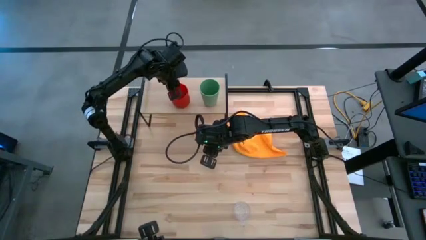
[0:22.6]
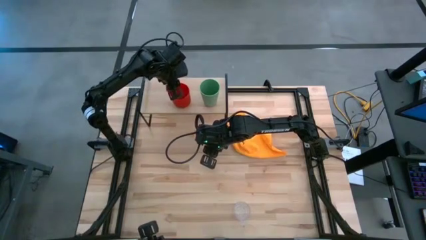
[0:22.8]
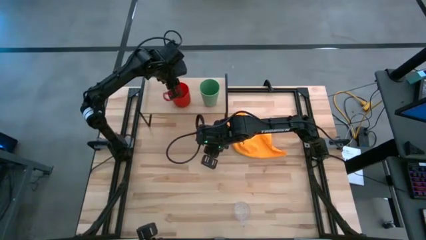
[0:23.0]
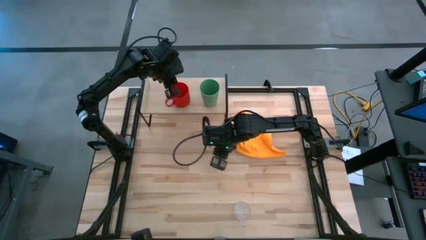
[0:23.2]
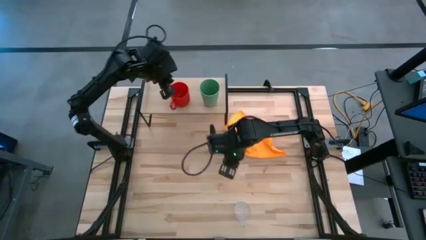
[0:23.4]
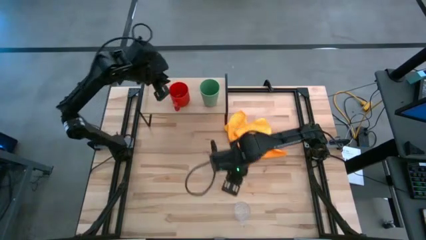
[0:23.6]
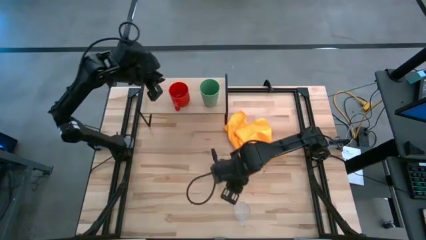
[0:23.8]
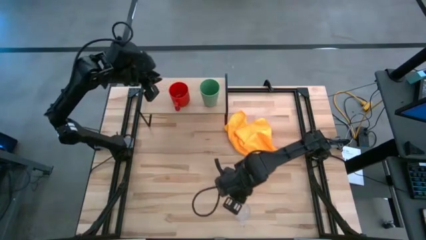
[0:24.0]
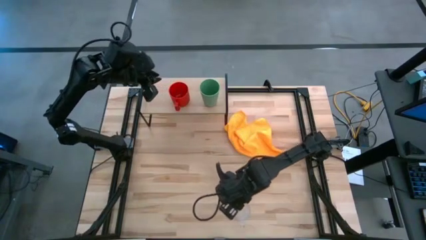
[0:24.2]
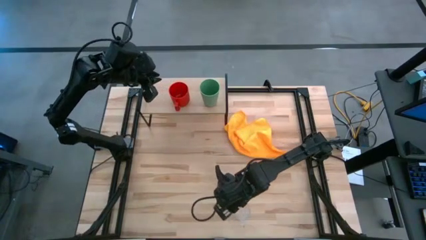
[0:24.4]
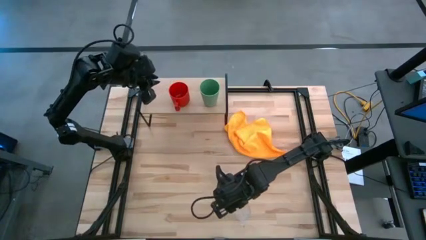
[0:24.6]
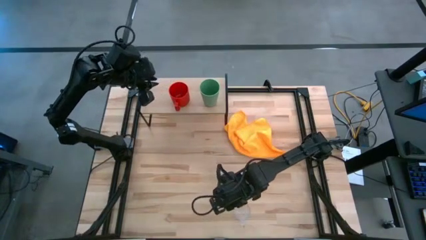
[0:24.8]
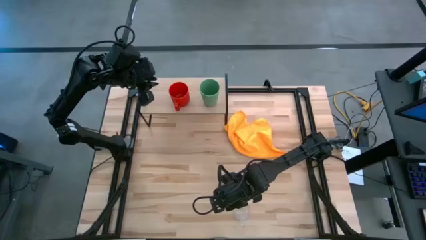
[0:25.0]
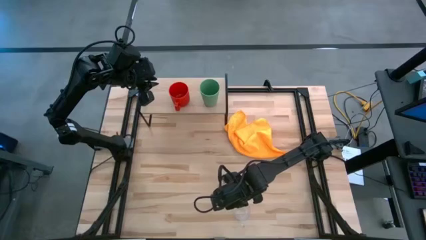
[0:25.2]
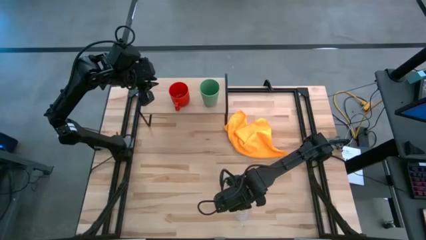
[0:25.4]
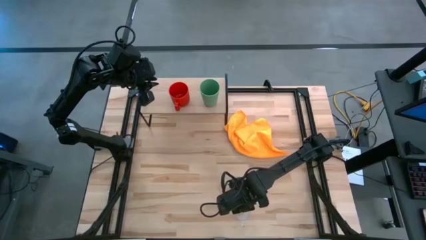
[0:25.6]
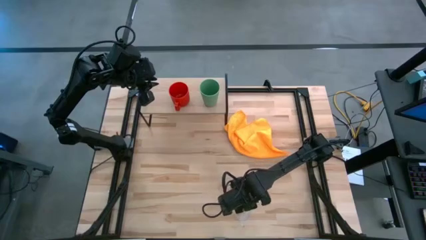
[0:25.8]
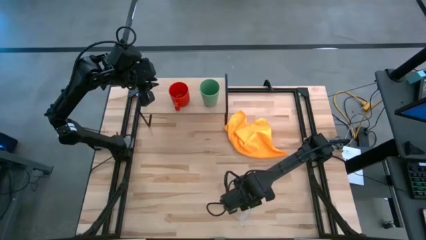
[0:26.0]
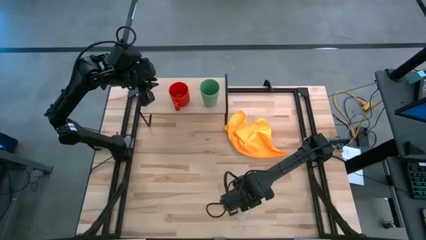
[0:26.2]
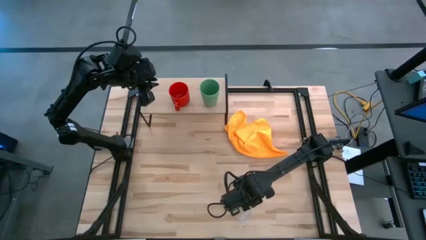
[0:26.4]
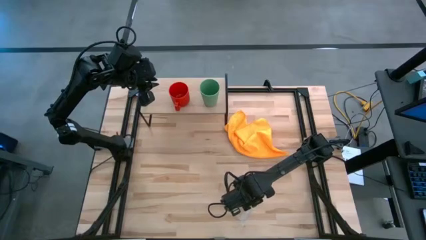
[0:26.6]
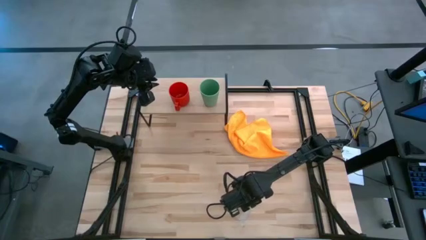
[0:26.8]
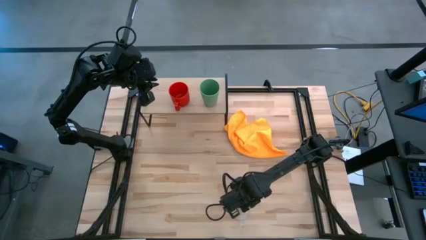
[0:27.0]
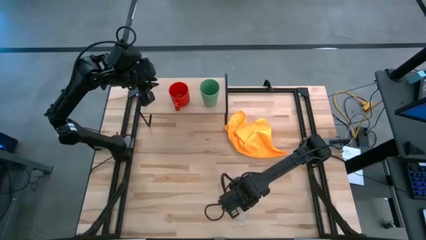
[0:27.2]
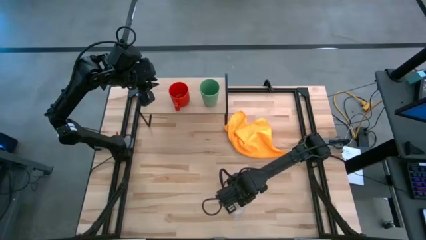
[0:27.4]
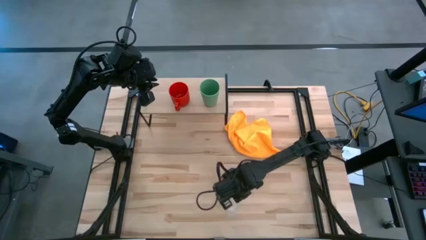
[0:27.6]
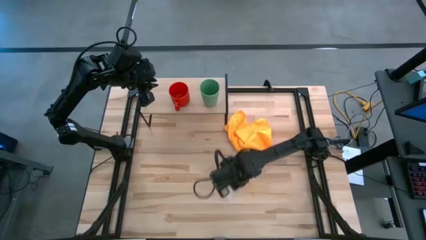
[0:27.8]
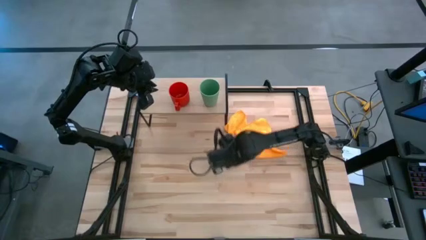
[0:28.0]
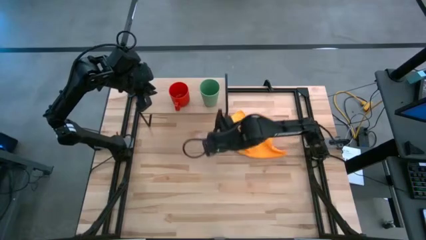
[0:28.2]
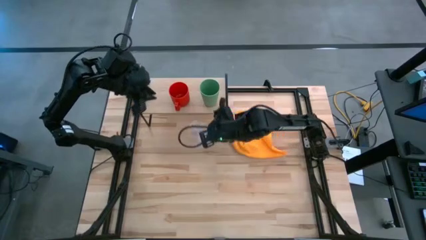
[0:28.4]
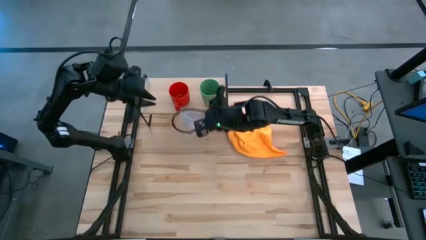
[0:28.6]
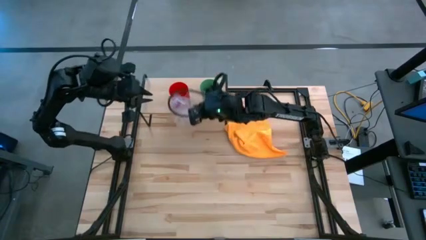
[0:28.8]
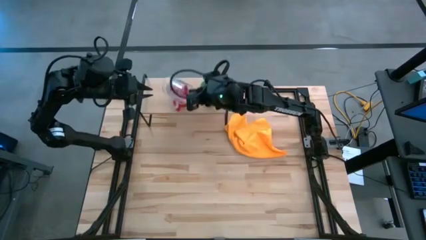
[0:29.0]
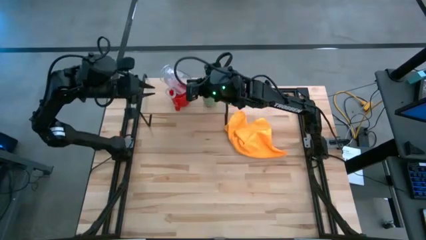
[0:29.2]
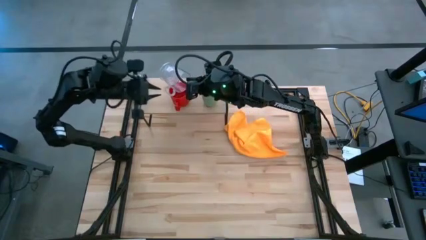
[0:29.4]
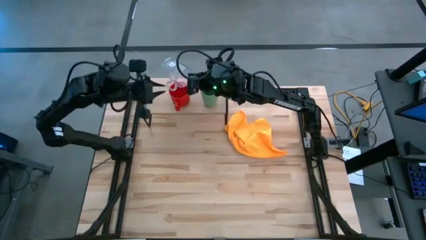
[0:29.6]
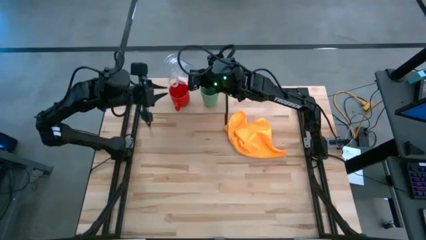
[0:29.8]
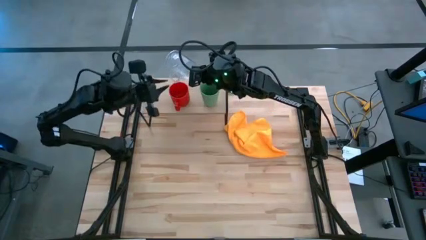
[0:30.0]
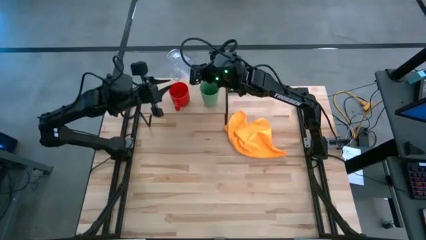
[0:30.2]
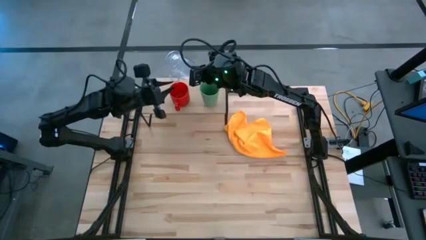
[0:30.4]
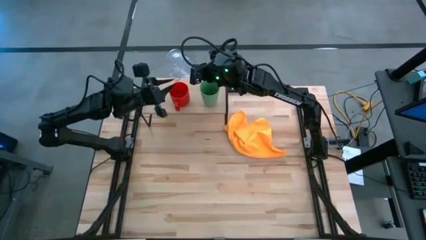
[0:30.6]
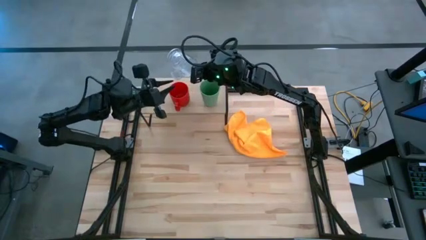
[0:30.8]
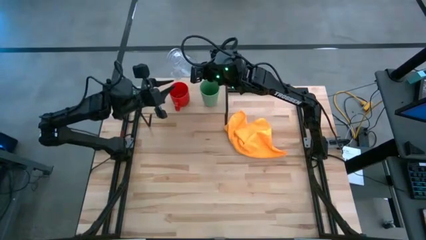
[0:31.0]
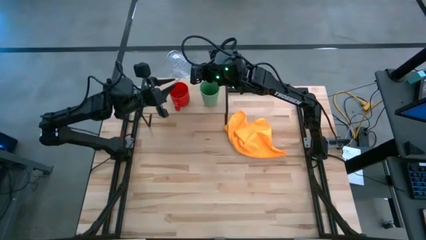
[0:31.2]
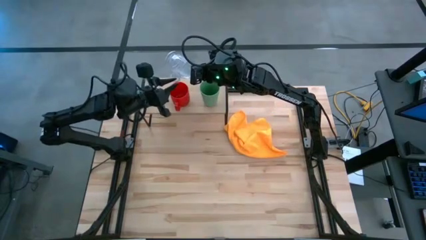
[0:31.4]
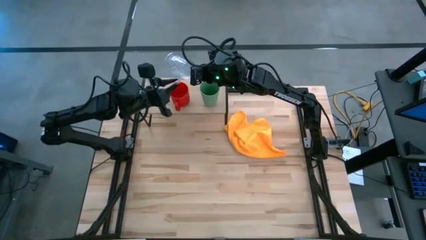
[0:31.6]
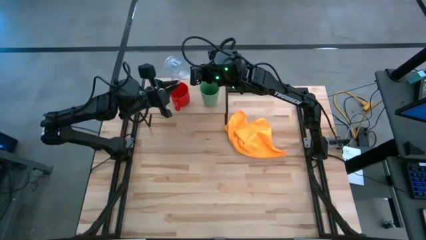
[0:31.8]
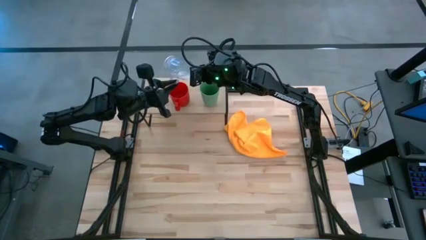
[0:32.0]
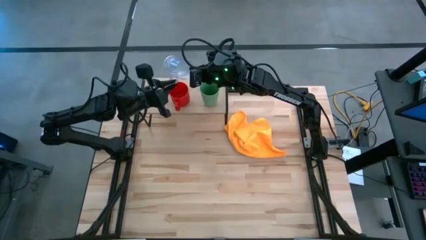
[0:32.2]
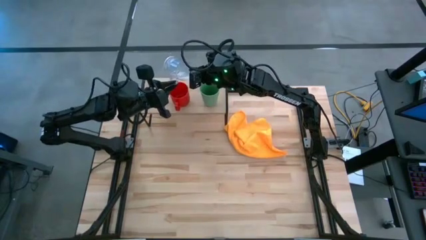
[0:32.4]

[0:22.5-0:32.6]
Task: Stack small to large cups/mugs on shelf
Put the transparent mug on the shelf
